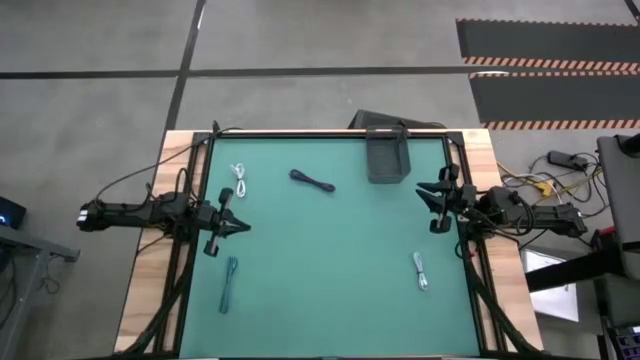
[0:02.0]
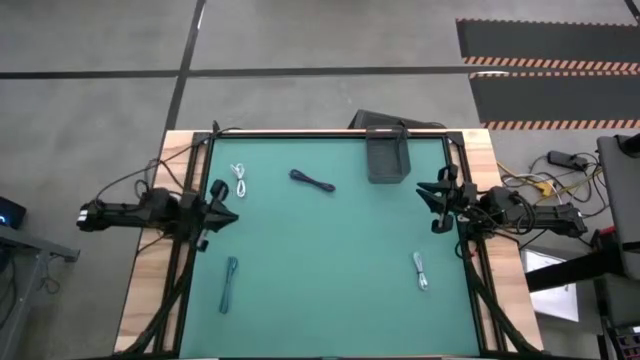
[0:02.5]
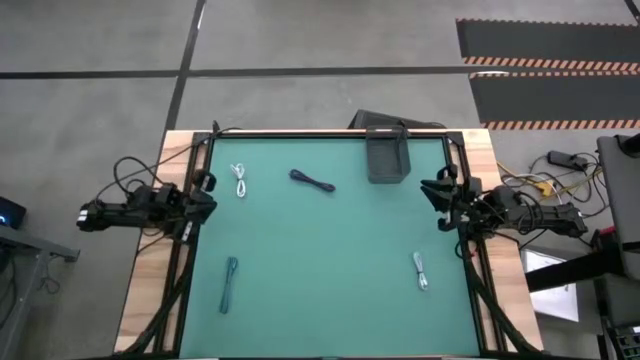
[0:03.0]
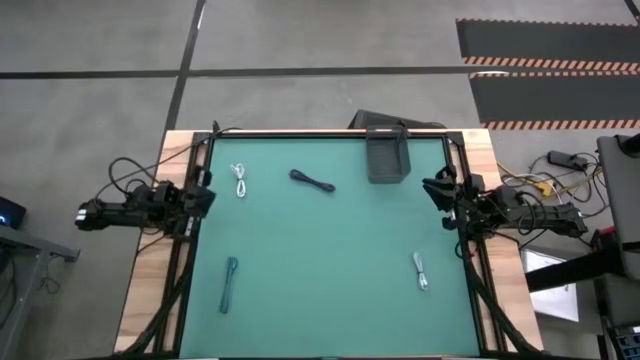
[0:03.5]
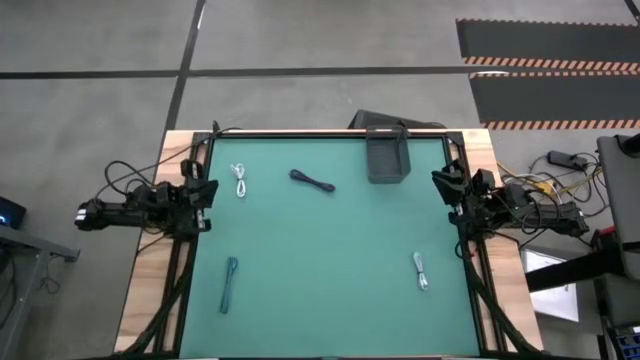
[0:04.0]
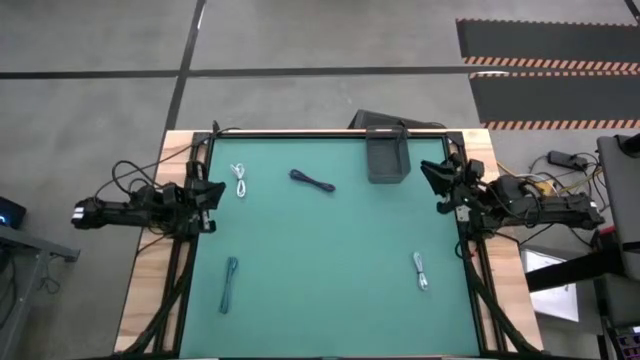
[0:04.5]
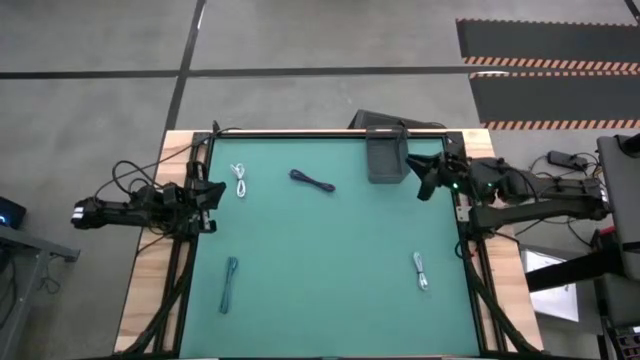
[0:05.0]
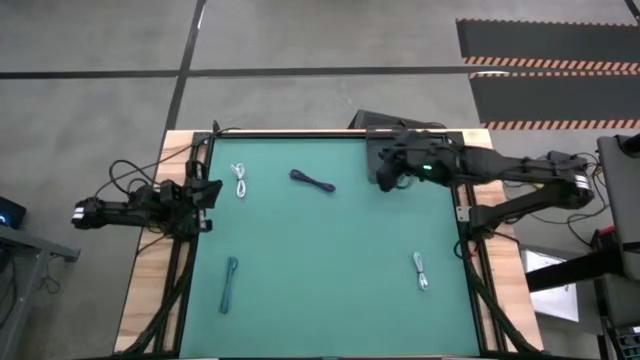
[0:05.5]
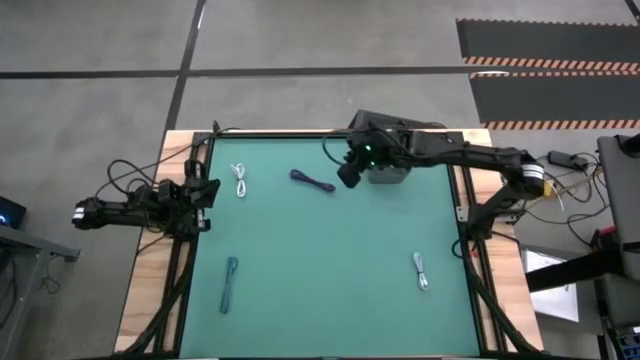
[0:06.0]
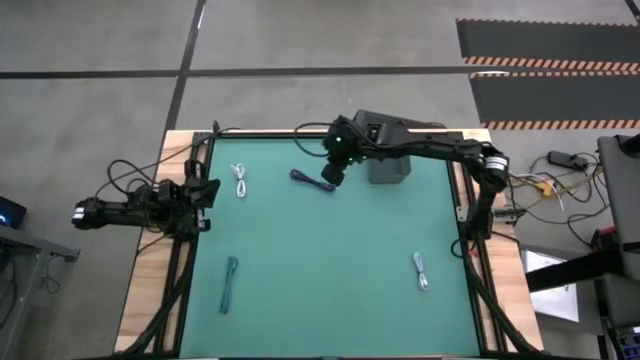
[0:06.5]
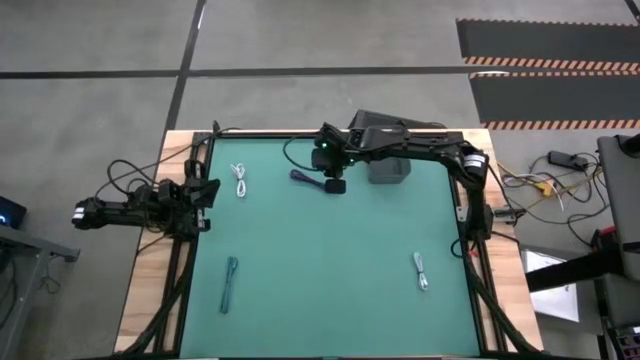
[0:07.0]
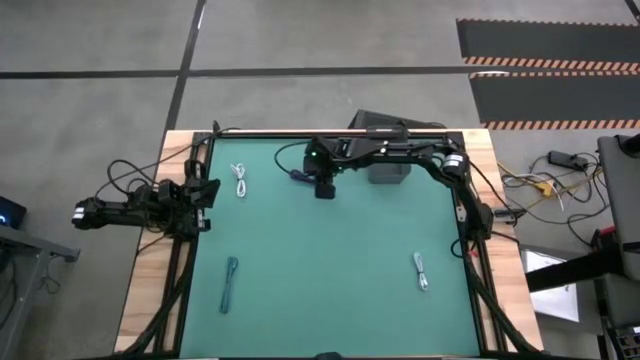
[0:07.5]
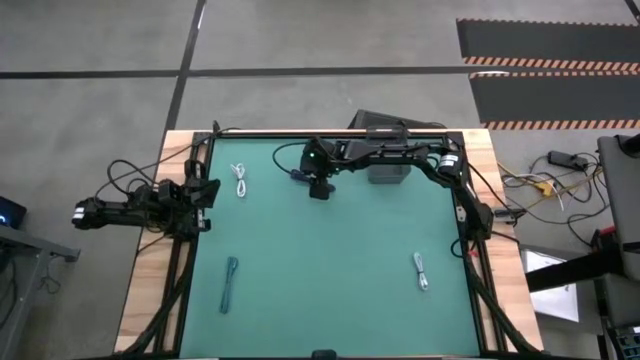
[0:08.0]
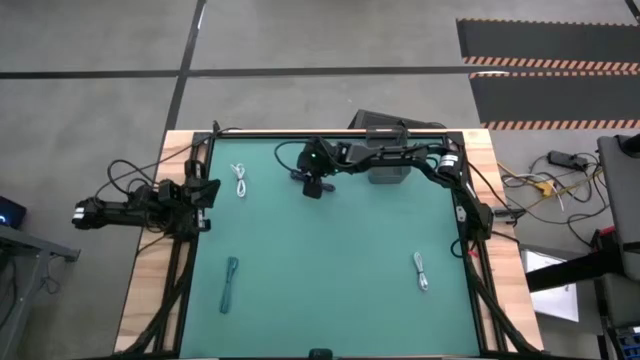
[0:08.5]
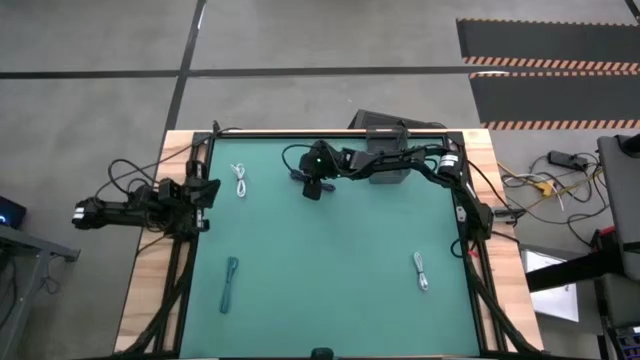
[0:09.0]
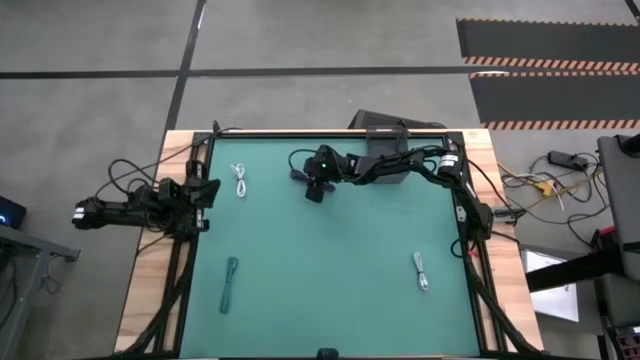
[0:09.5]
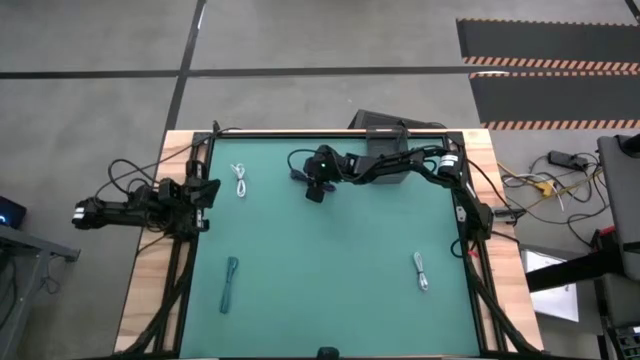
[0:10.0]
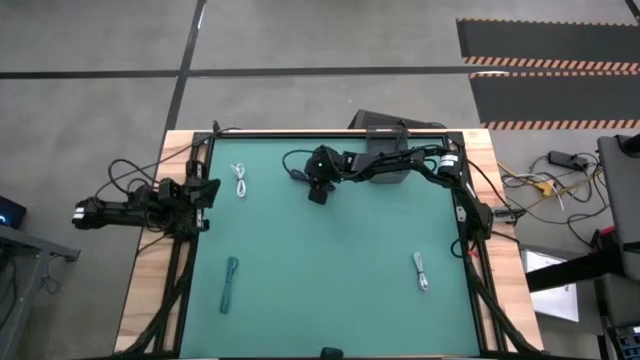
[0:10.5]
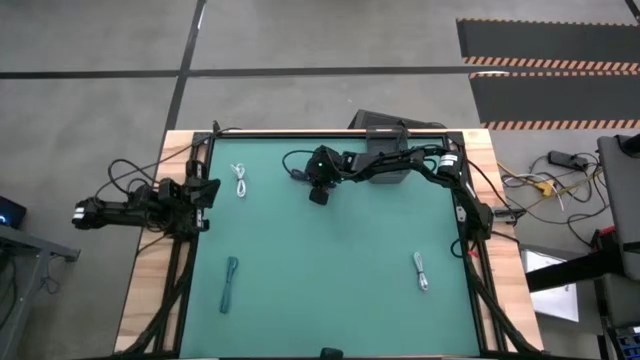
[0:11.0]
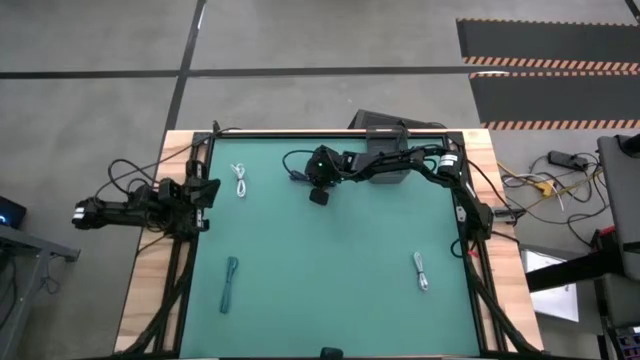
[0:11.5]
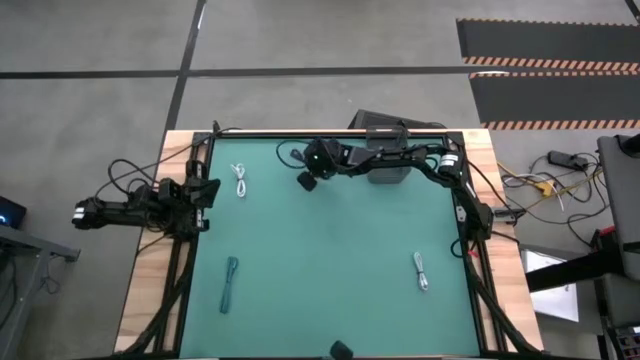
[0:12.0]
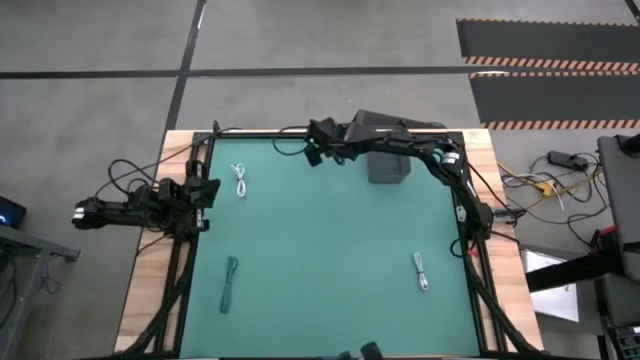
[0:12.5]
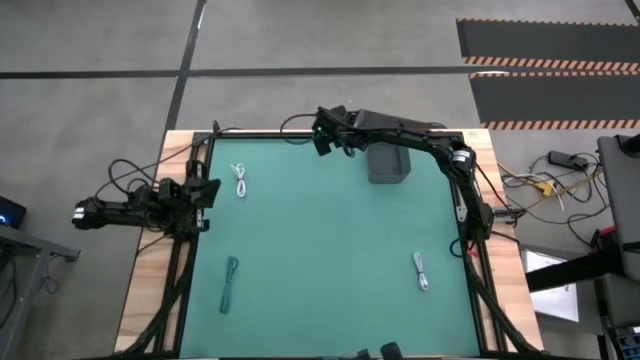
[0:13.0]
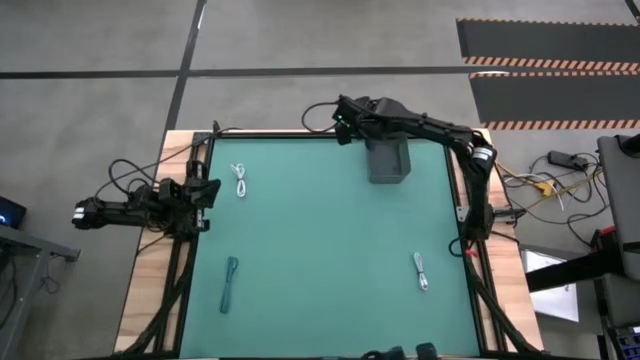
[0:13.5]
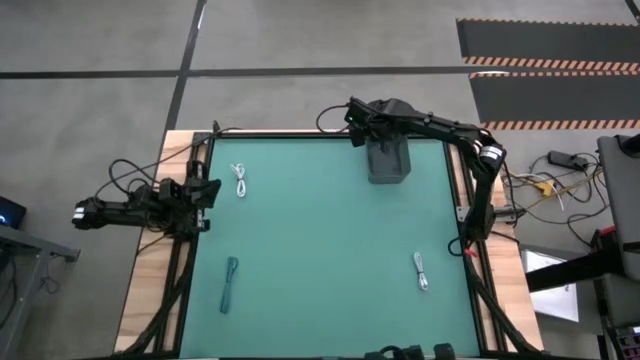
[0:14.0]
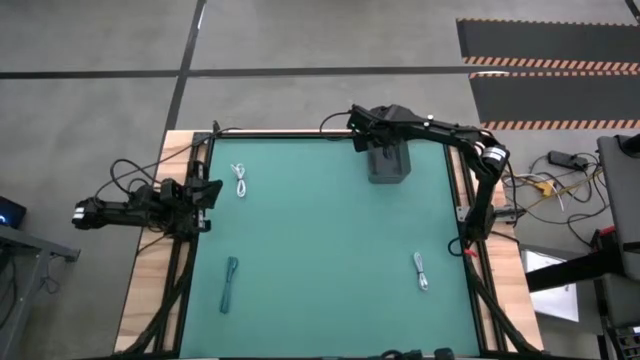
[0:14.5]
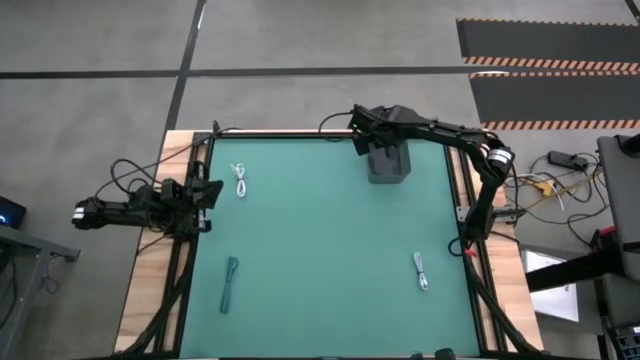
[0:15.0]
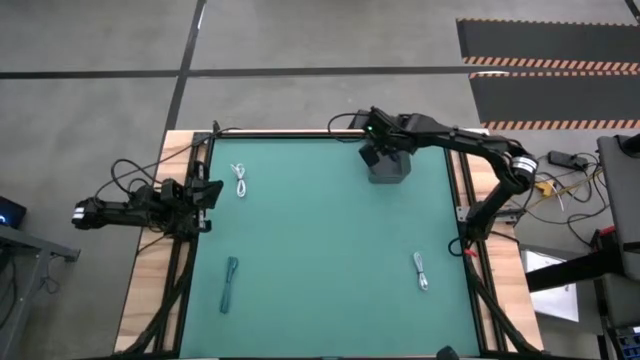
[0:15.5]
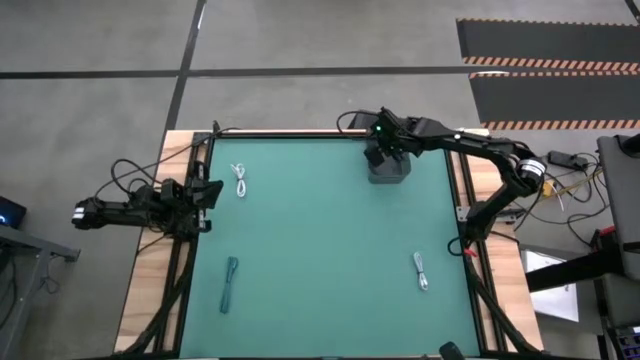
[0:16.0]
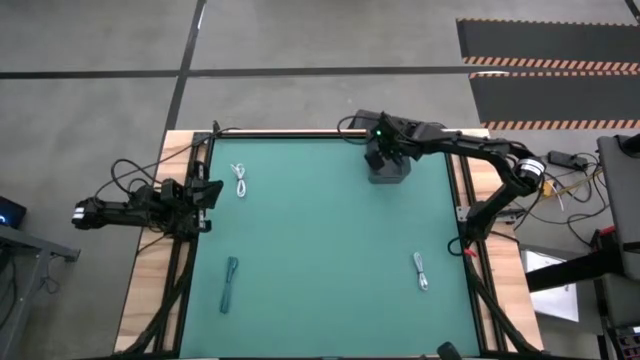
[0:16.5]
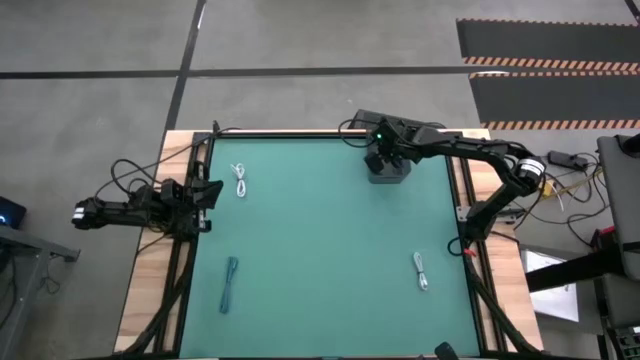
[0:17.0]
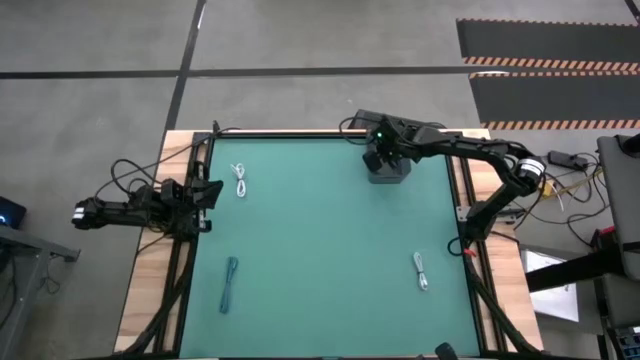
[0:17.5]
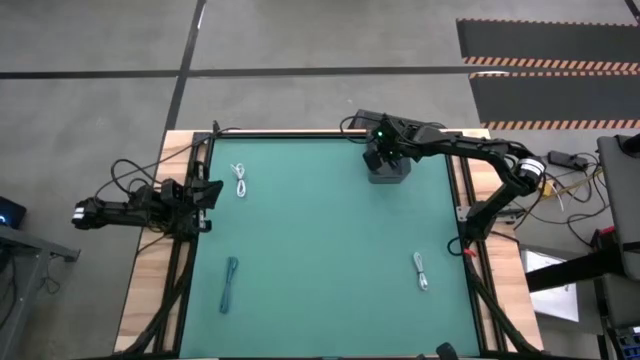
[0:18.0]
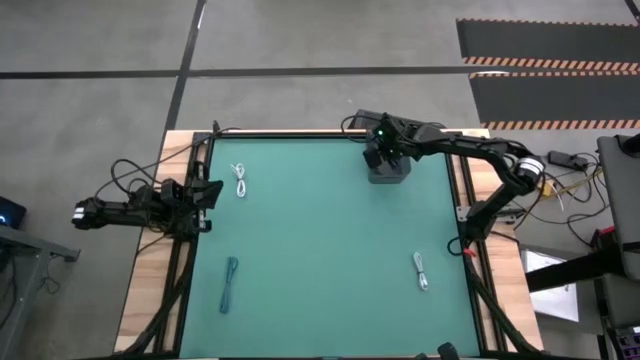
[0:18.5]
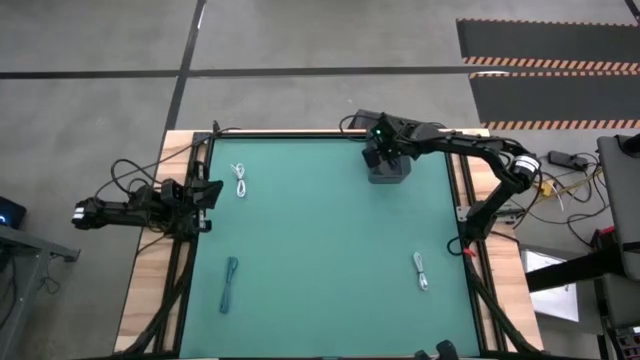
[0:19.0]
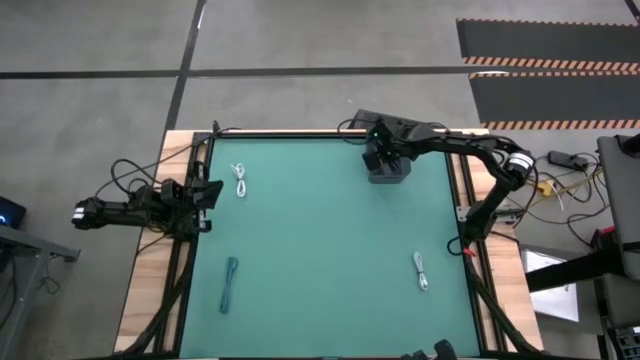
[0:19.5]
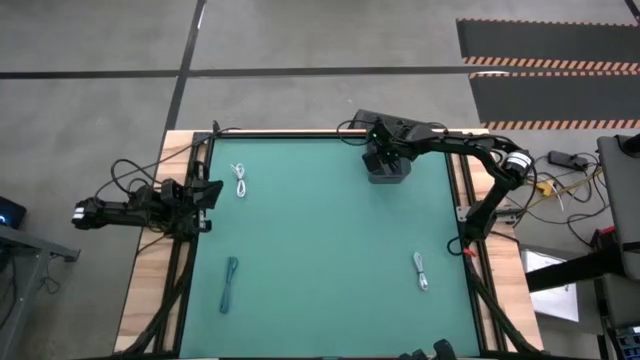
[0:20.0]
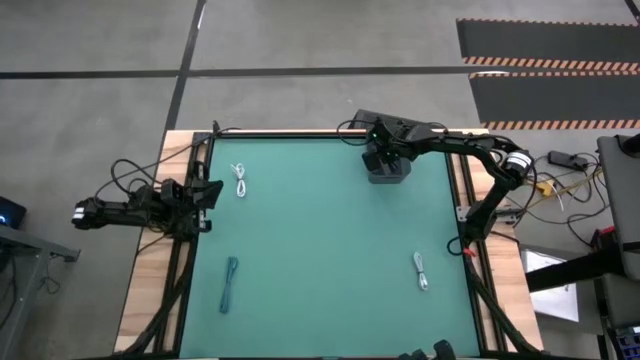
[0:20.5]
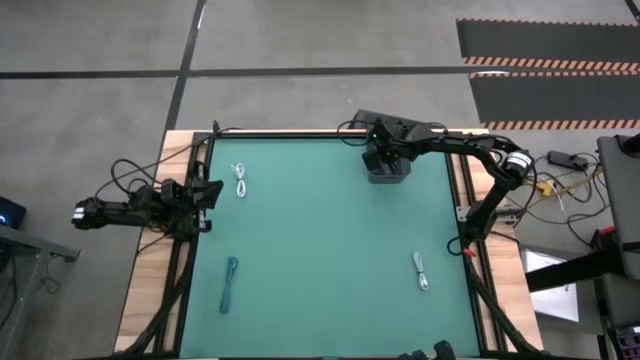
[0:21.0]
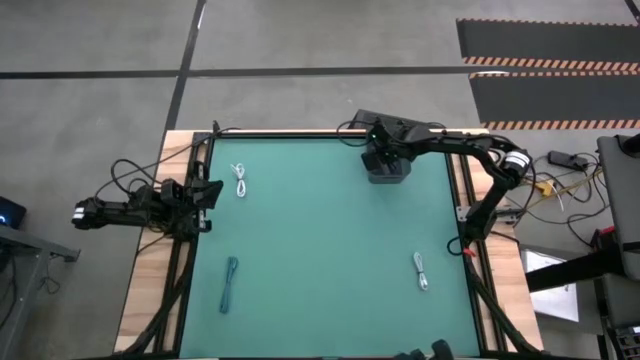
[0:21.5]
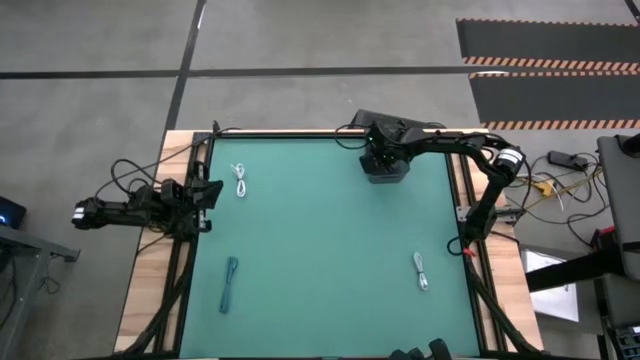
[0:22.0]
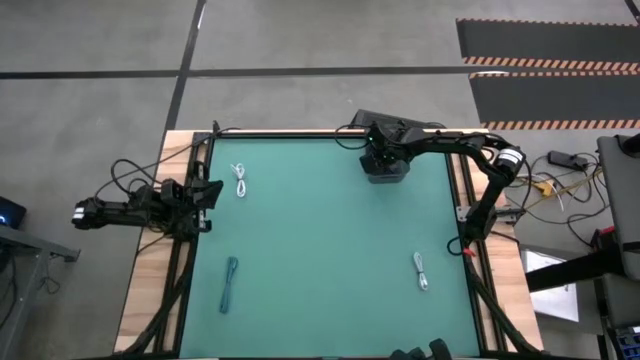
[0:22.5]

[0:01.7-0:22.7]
Task: Pick and place USB-C Cables
Put the purple charger cable into the black bin
